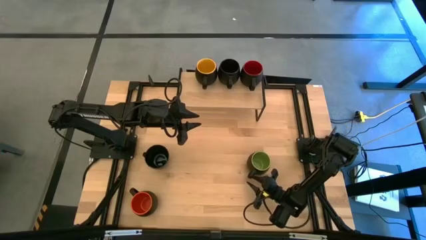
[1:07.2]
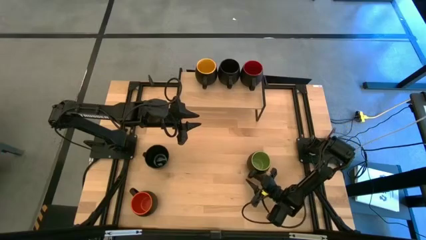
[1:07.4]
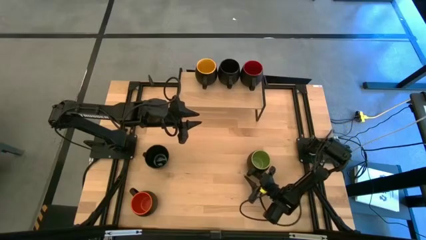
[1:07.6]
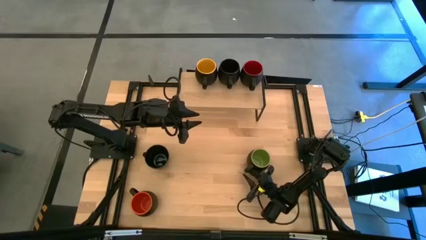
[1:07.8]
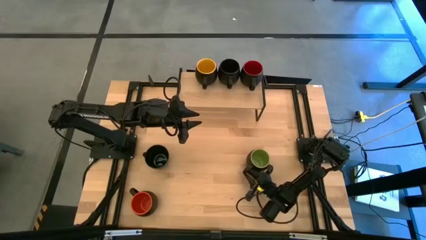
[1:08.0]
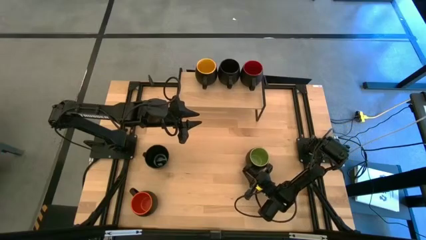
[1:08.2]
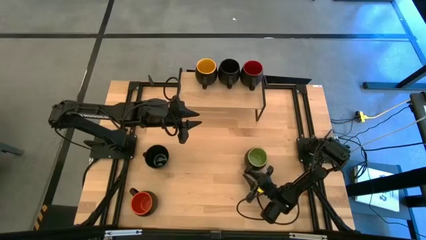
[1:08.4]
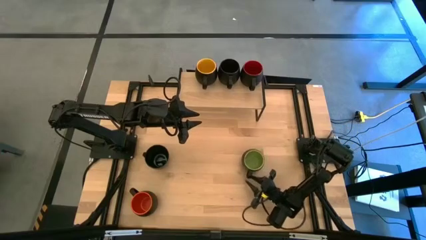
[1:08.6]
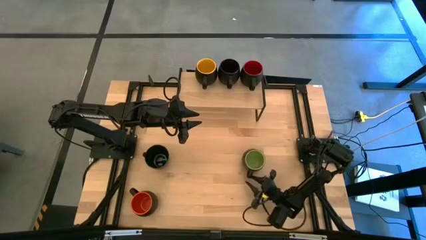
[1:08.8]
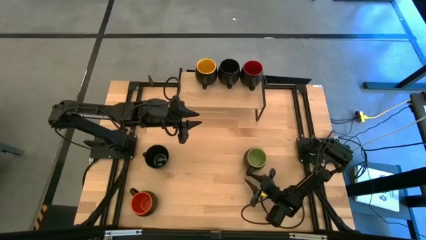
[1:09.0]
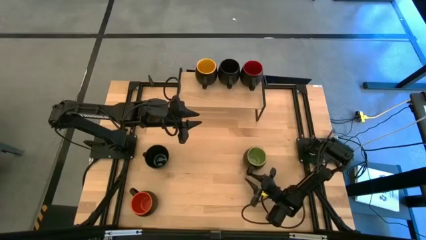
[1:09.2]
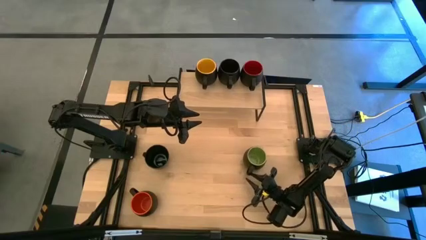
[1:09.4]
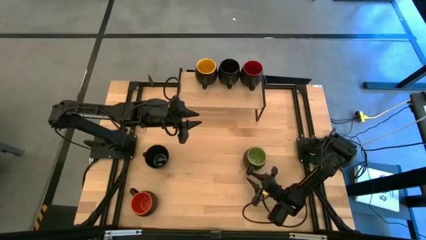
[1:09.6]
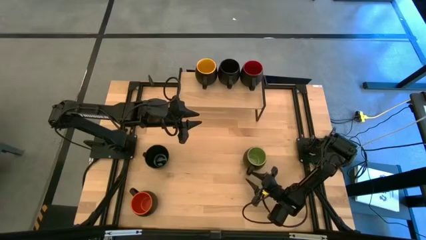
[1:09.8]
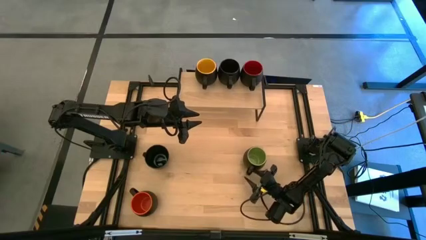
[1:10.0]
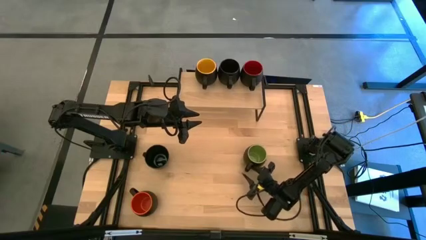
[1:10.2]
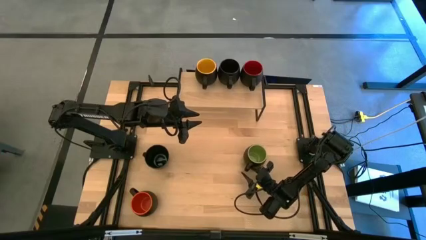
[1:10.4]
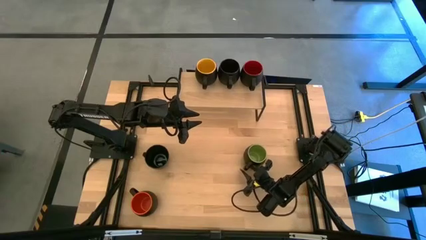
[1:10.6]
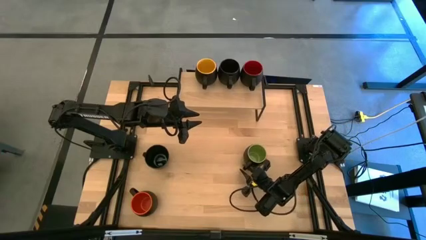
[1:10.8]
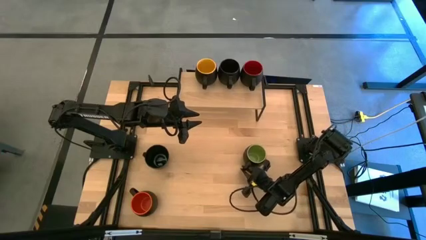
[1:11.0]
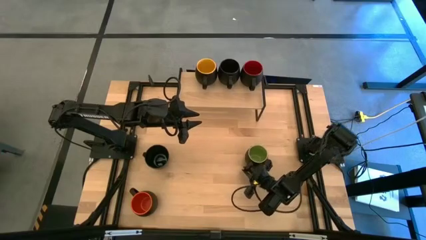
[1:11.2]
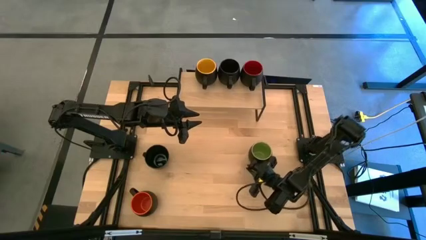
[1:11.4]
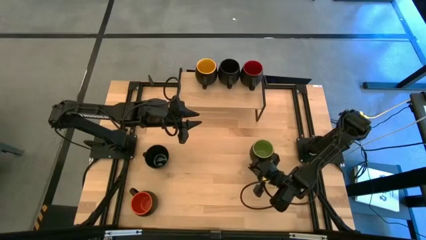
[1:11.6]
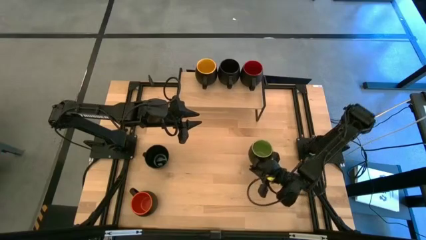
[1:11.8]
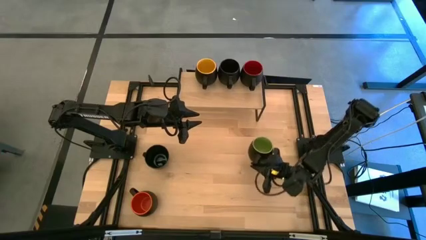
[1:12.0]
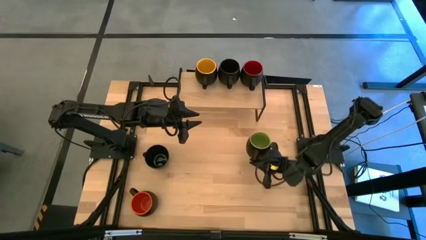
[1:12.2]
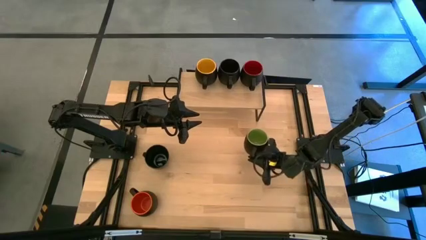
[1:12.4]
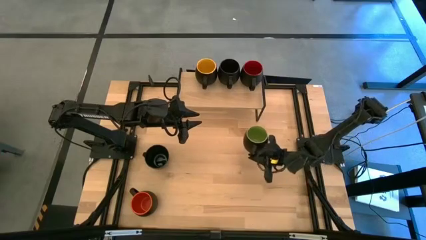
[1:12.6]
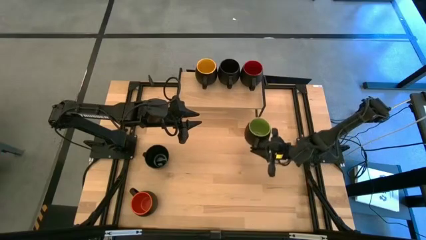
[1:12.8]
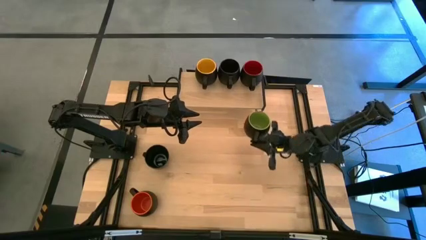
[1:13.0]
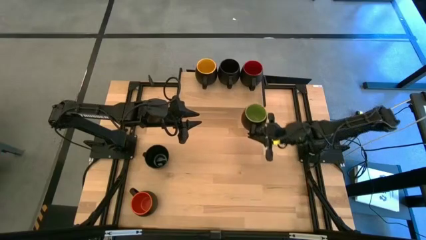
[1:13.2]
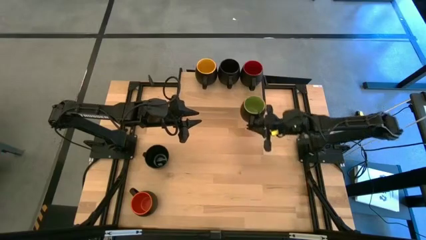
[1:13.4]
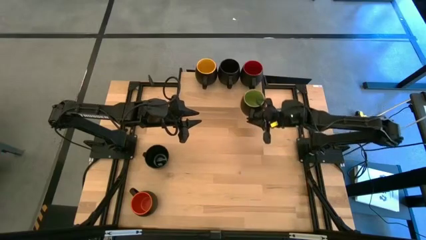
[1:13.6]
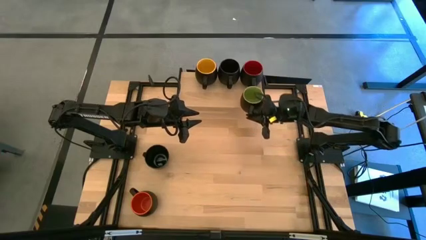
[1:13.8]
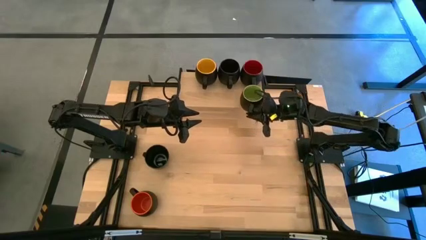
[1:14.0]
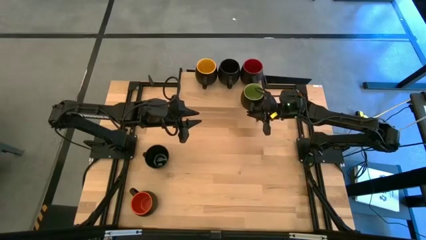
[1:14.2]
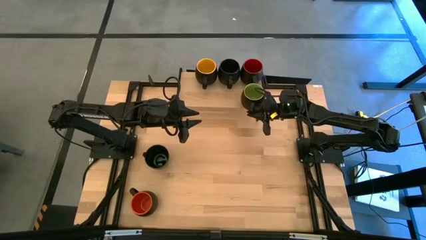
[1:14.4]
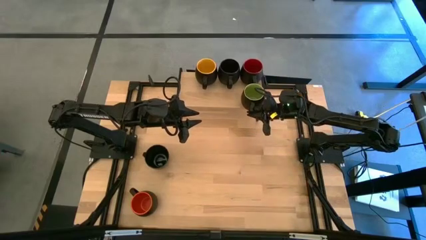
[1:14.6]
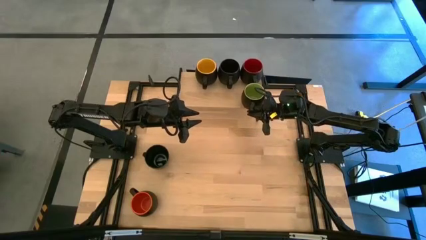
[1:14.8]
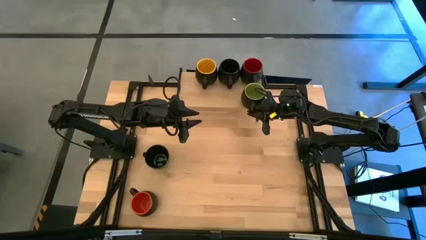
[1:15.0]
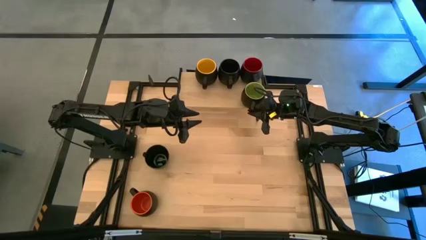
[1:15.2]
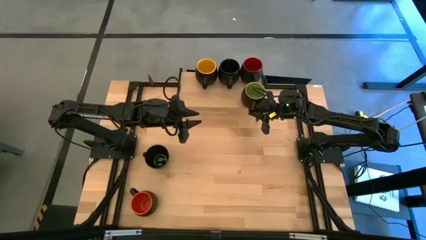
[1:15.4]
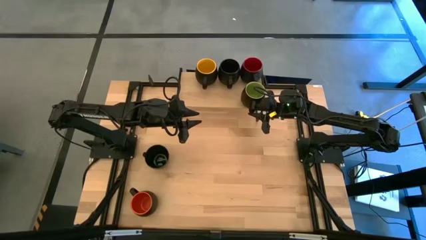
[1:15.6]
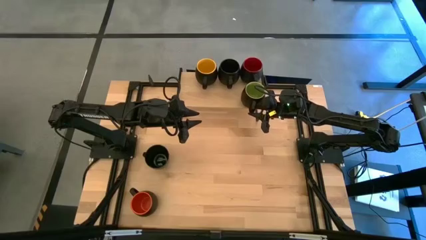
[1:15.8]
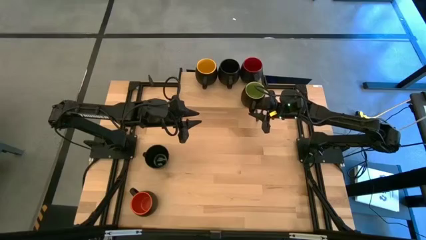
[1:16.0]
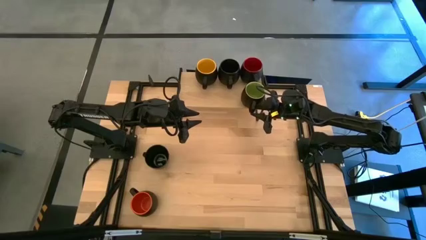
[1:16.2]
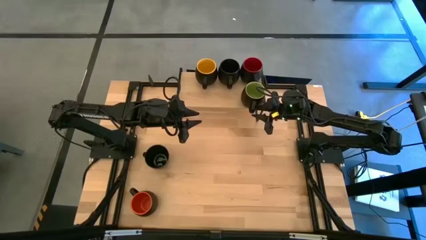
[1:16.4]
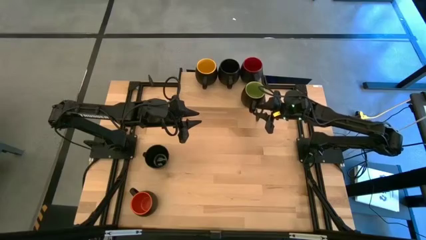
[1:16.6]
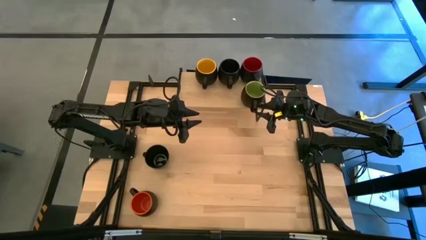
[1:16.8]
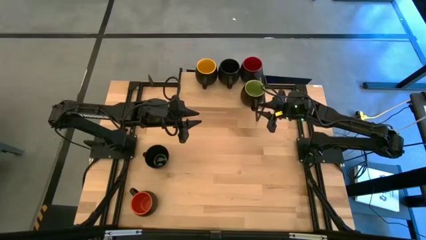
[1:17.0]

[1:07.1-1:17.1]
Task: Place coffee mugs
Put the green mug on the shelf

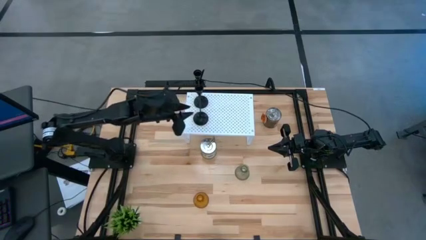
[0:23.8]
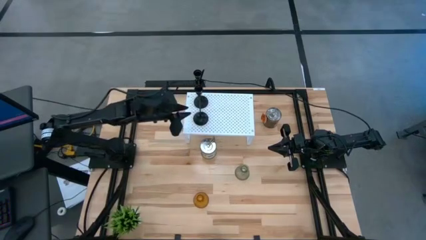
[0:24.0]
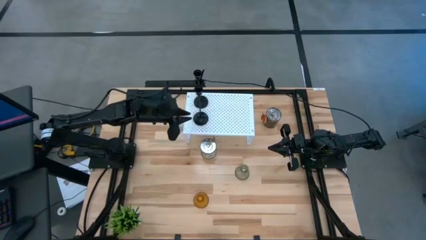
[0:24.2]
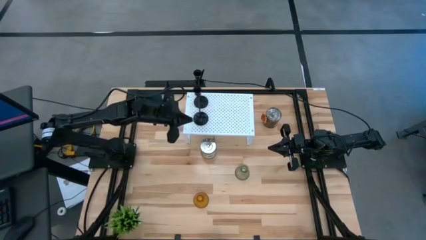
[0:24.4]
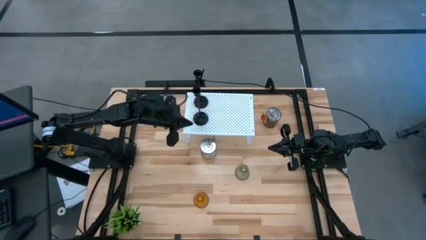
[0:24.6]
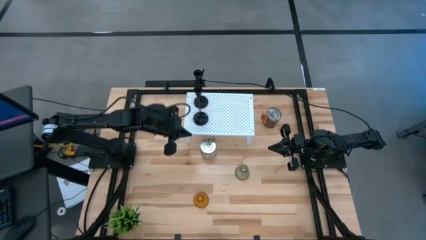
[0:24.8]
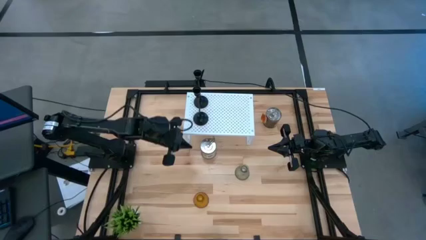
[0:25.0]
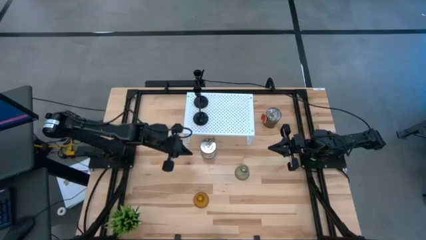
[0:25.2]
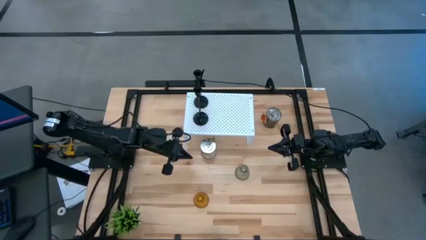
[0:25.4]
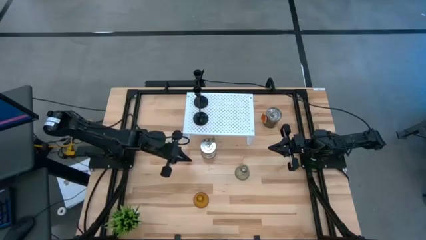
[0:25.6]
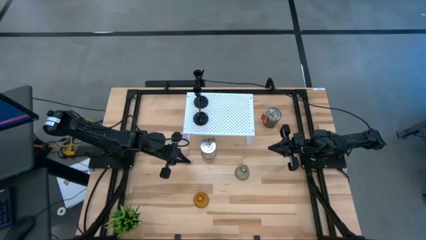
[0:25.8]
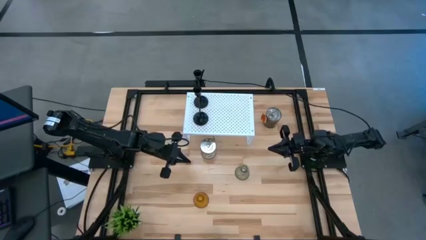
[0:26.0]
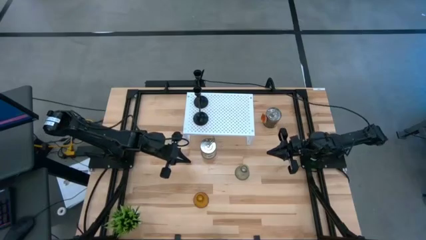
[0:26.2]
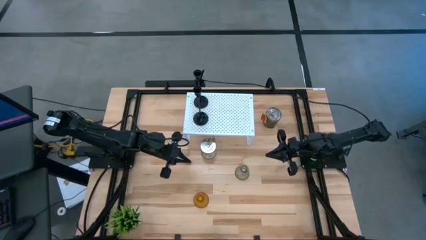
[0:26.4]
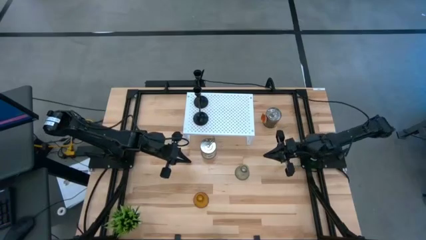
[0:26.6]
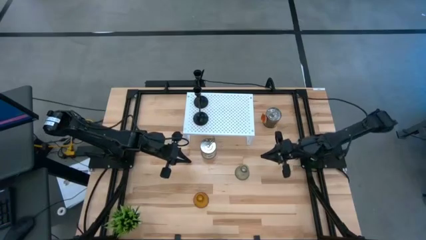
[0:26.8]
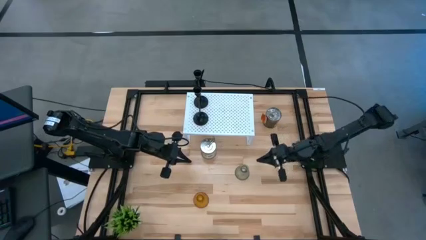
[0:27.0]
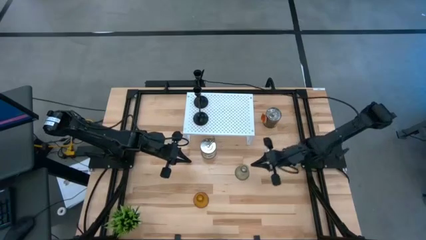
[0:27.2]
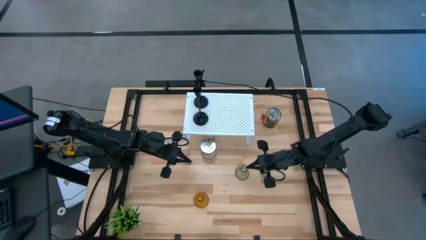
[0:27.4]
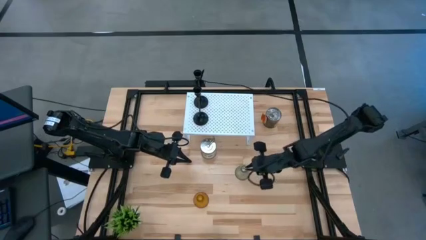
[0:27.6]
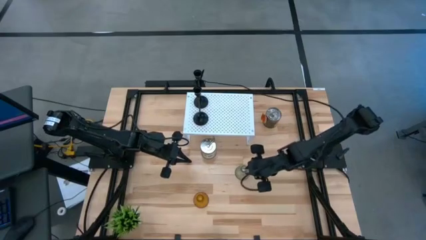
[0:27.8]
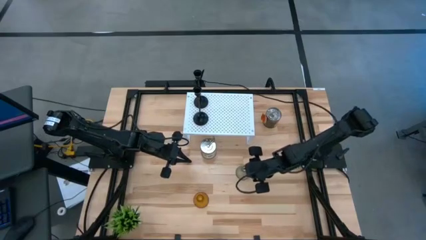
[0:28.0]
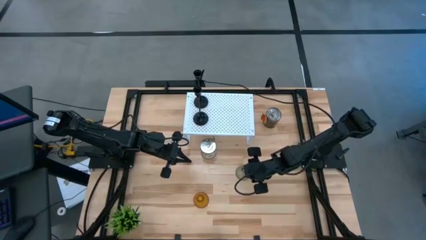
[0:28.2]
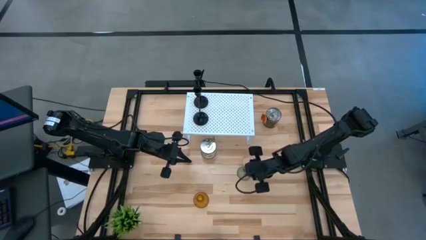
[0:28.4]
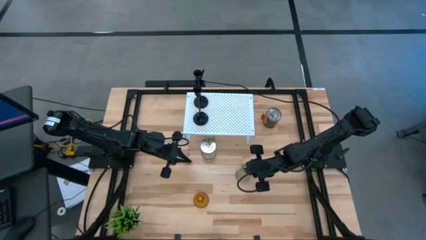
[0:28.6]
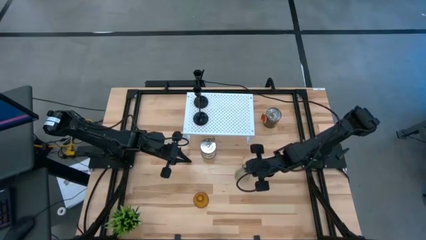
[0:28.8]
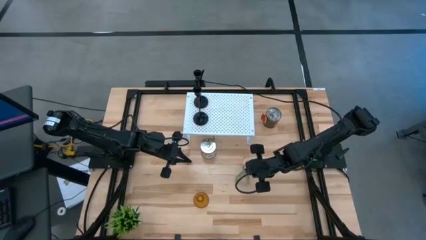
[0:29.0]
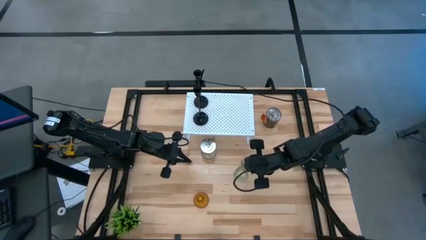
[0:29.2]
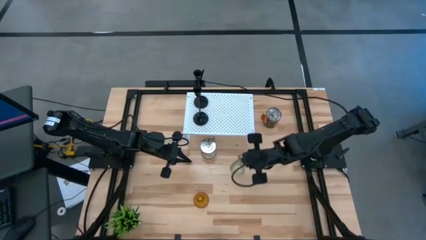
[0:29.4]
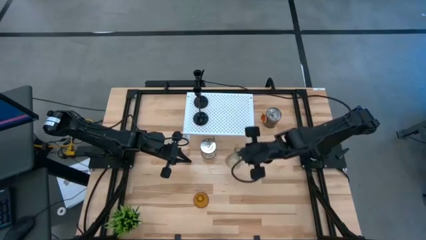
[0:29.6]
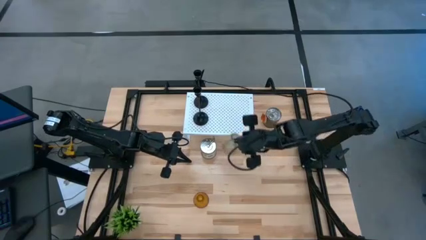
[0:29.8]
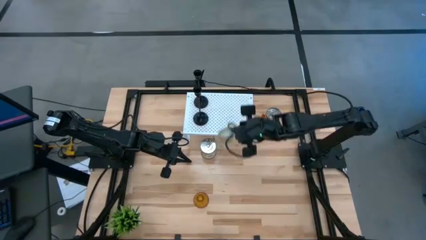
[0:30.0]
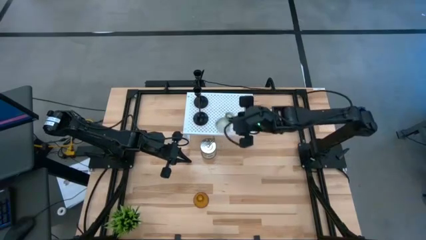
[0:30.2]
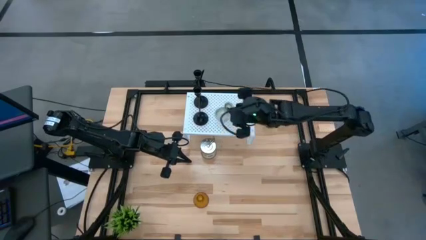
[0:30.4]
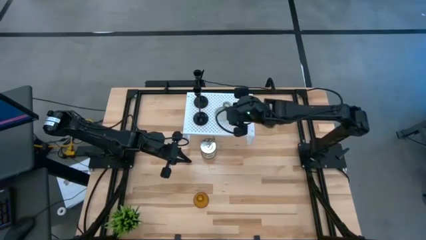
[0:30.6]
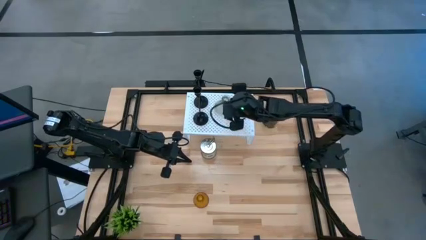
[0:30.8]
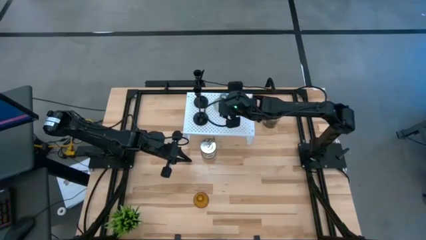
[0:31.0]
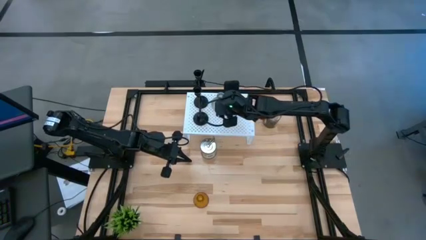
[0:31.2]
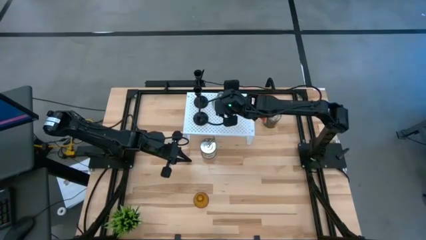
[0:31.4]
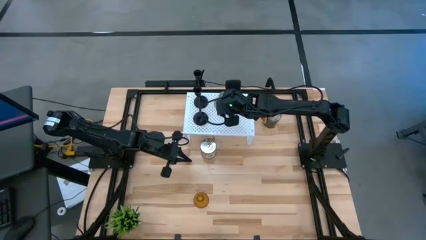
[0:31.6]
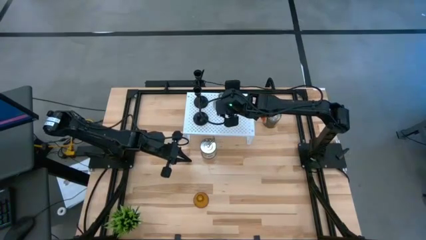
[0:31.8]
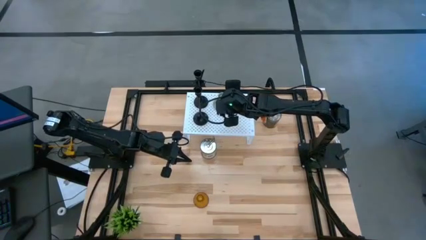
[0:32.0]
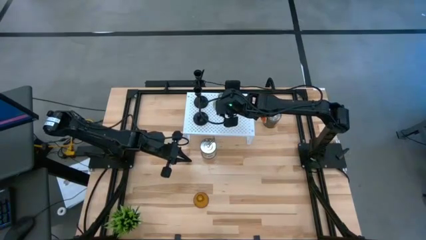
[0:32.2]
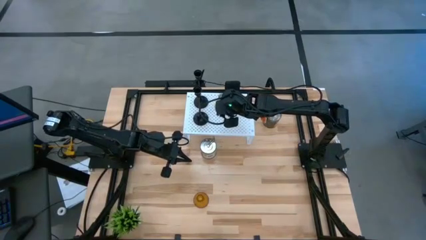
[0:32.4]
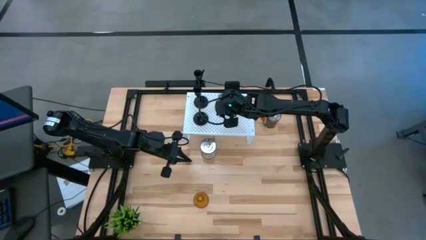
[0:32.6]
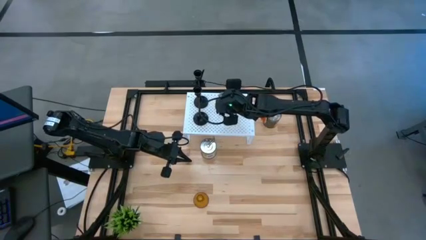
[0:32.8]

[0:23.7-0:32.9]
Task: Pick & Place candle stick holders
Put the green glass on the shelf
